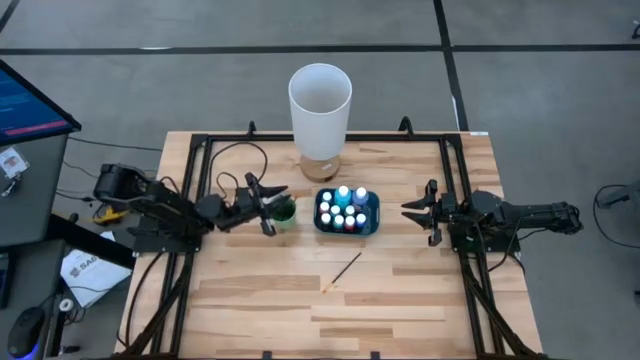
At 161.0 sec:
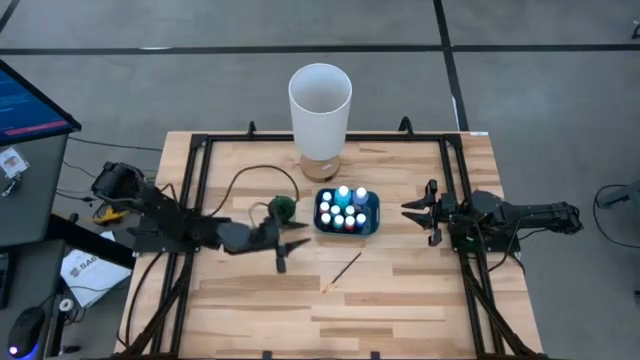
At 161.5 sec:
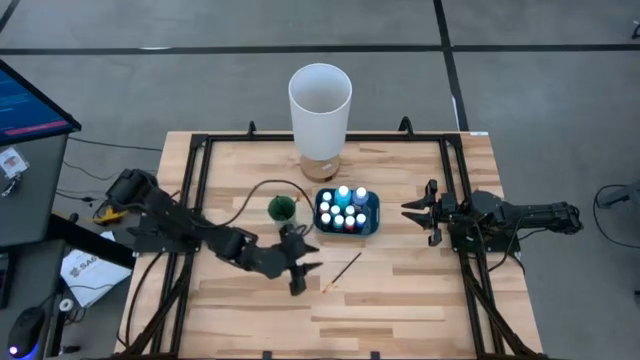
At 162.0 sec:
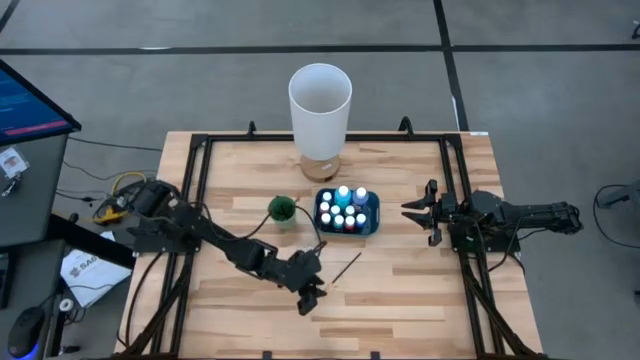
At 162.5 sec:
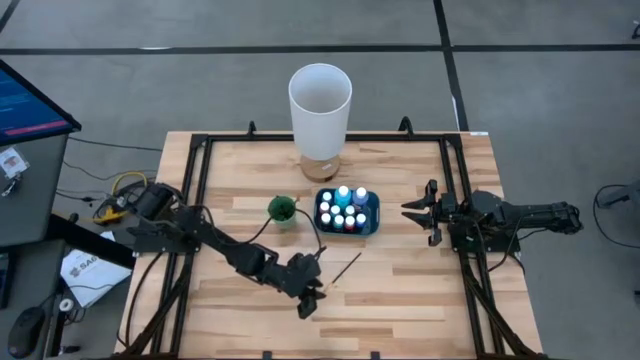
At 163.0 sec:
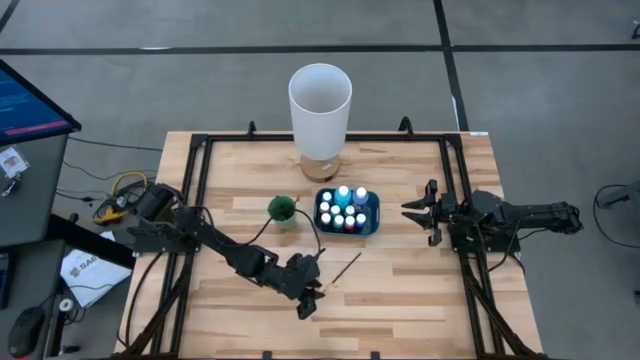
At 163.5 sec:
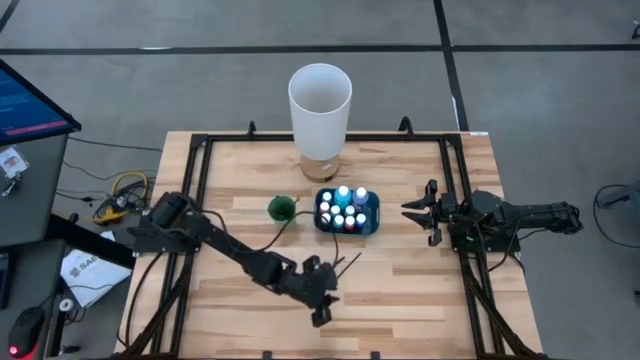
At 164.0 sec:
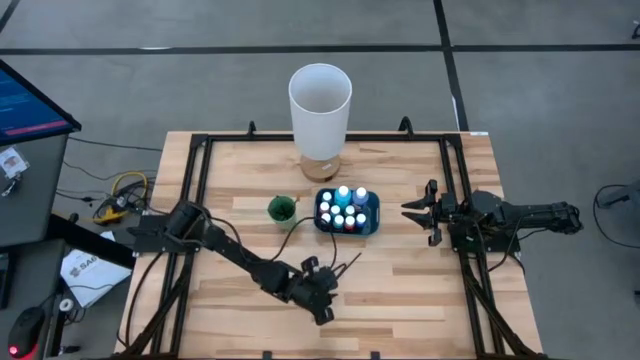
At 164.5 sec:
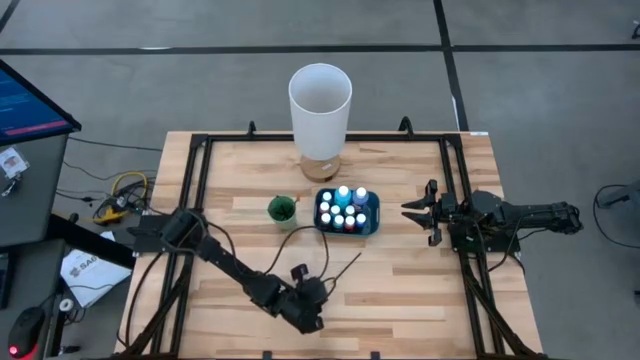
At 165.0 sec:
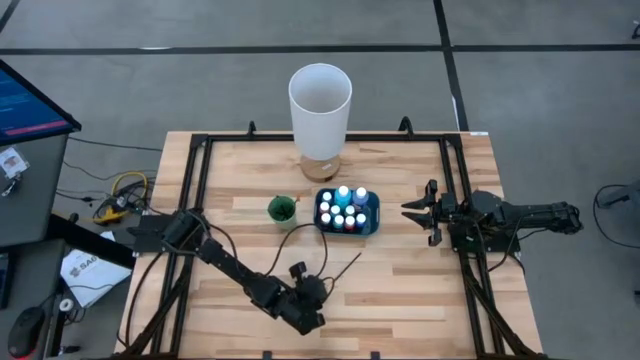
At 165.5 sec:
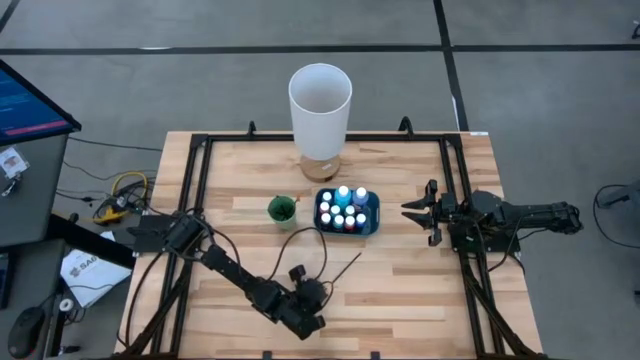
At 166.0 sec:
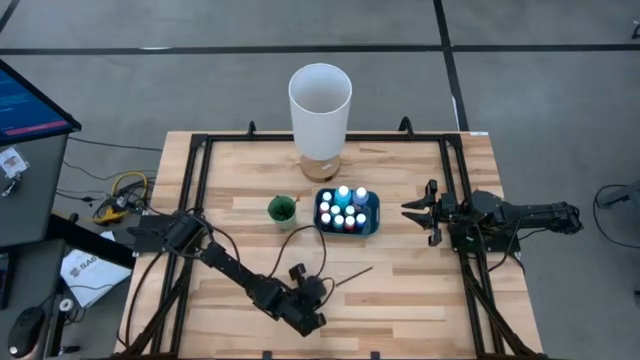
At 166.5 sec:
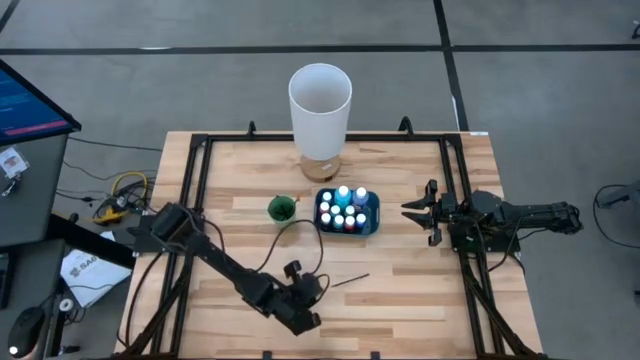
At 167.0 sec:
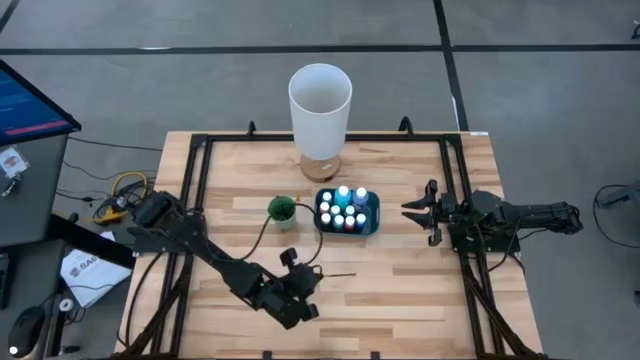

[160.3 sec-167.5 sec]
Task: Pick & Place Paint Supplies
Put the gold paintbrush into the green cup

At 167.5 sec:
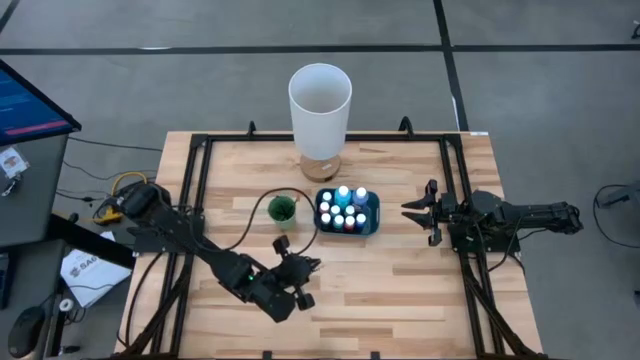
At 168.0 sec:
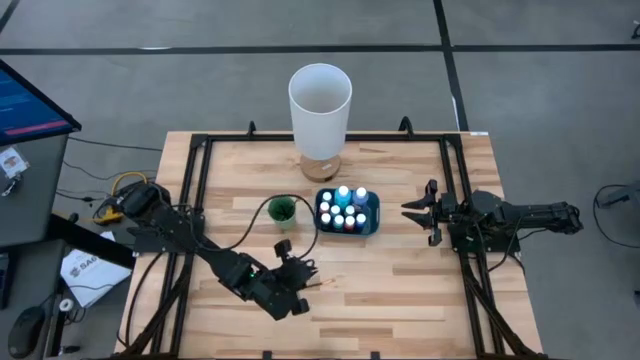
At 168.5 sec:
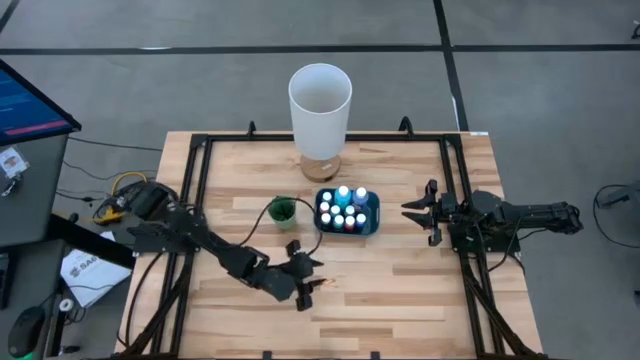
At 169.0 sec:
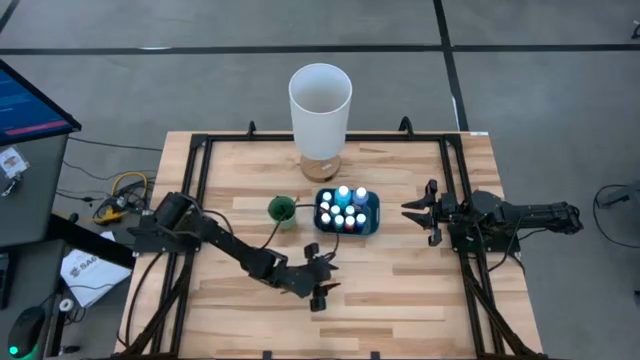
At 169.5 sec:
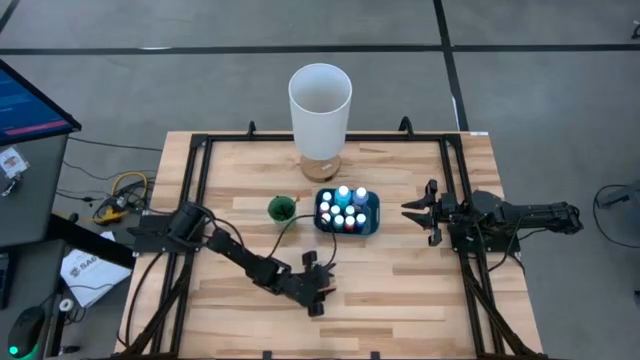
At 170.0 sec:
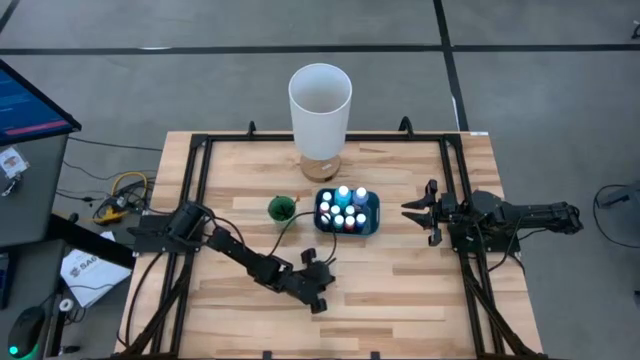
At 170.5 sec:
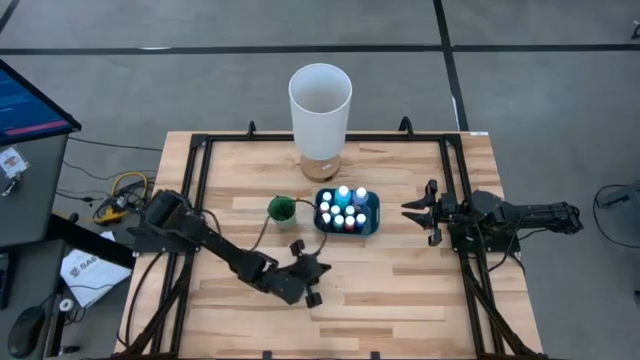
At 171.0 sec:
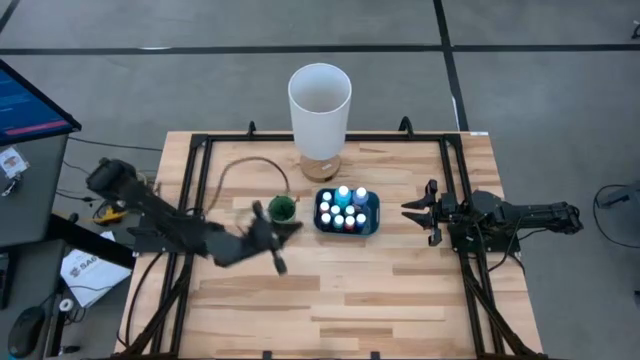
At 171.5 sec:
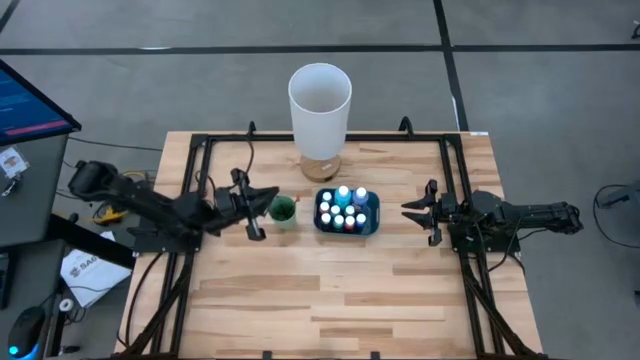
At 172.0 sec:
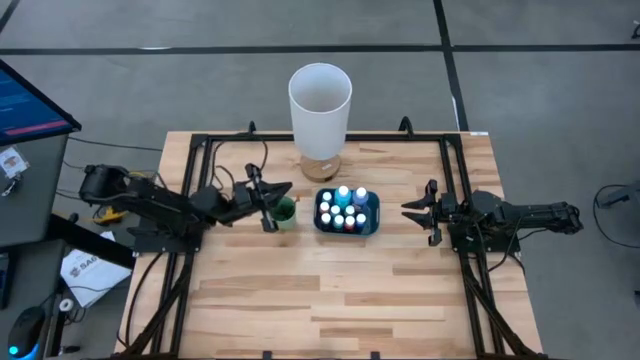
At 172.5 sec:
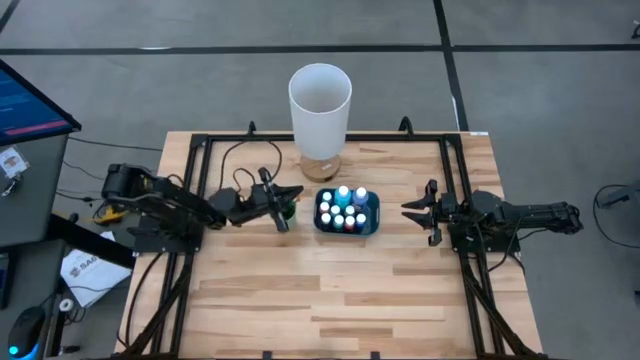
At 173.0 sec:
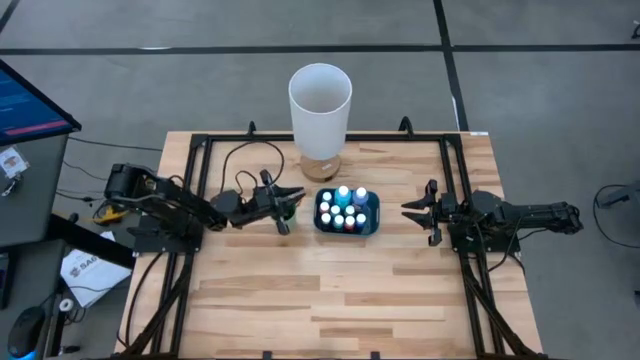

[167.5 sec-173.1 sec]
Put the gold paintbrush into the green cup

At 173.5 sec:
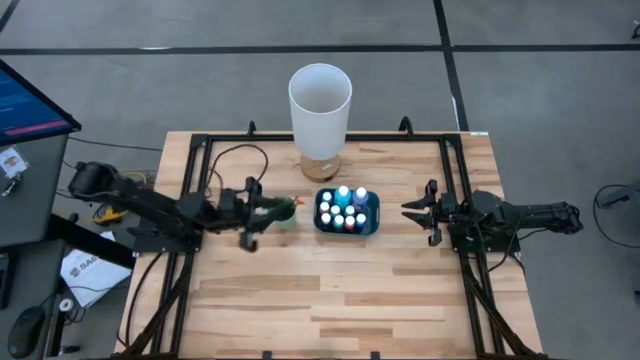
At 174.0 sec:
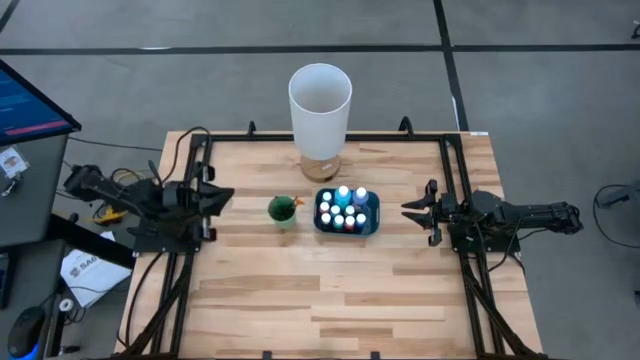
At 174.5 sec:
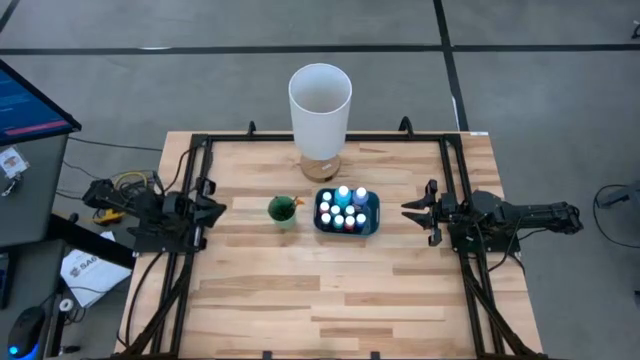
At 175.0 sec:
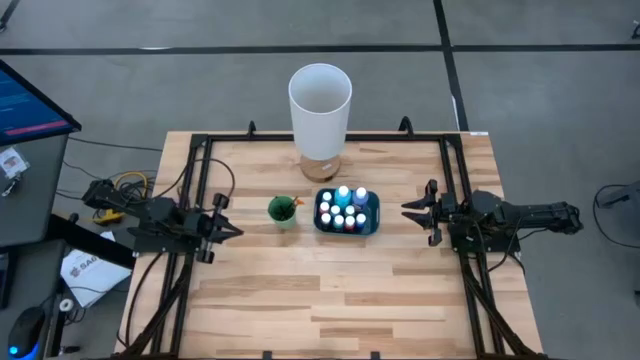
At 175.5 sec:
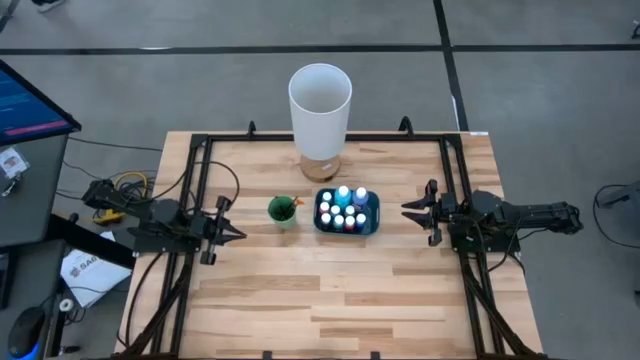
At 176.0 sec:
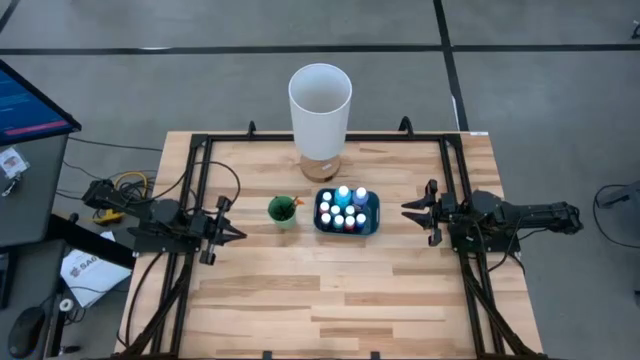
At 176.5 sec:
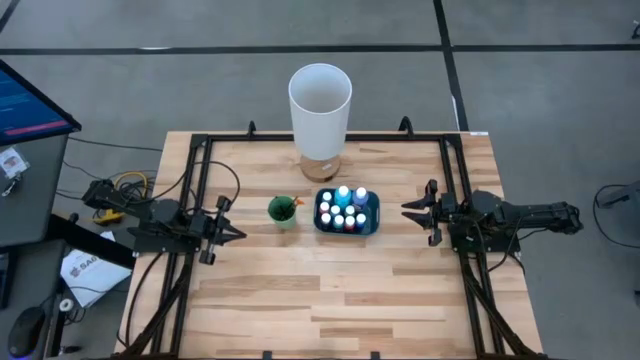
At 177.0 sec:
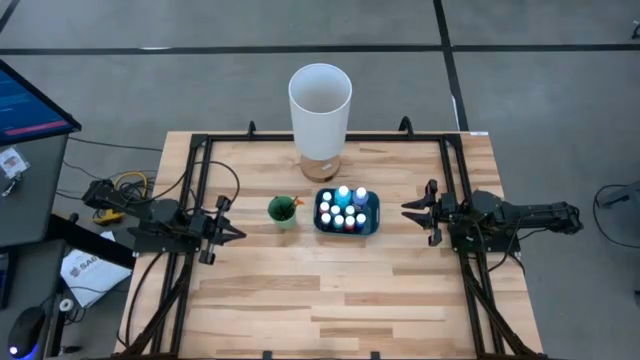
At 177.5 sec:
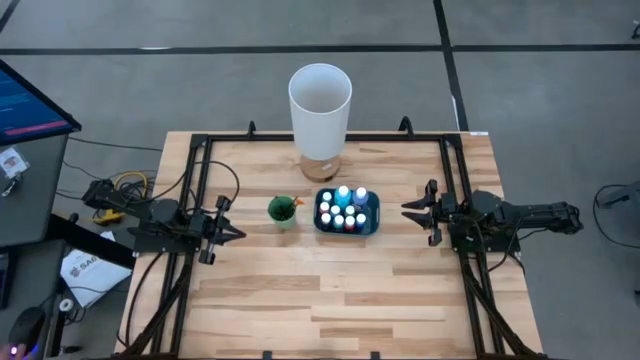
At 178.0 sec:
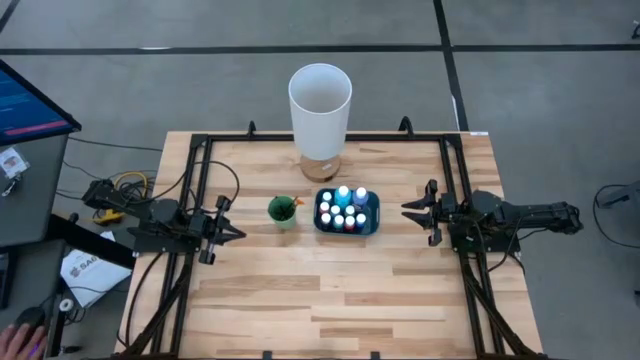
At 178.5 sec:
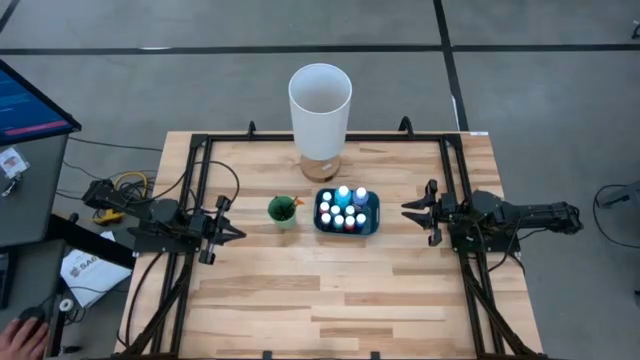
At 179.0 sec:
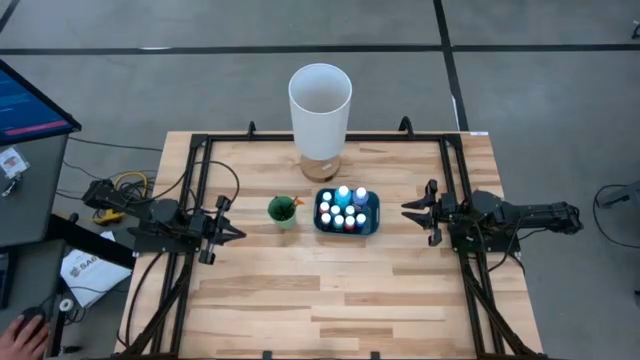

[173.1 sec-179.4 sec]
Return to Home Position

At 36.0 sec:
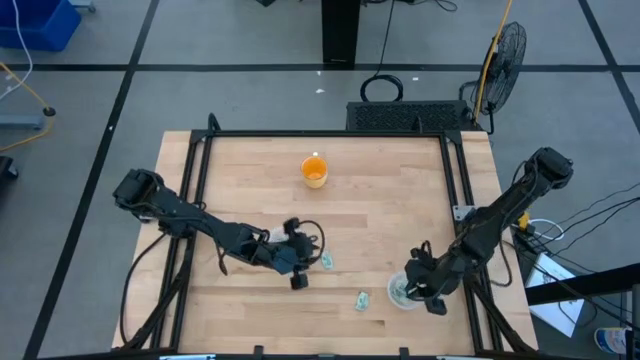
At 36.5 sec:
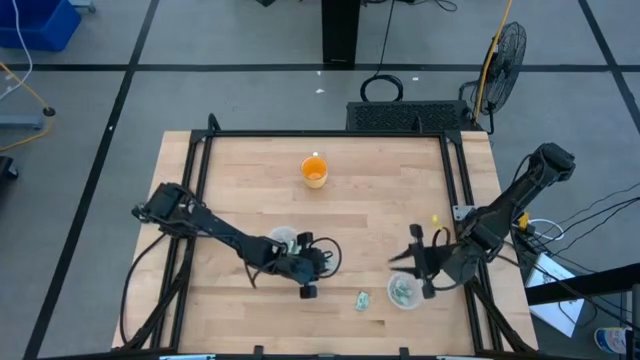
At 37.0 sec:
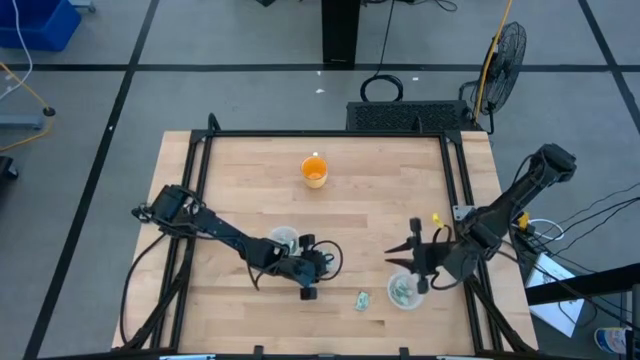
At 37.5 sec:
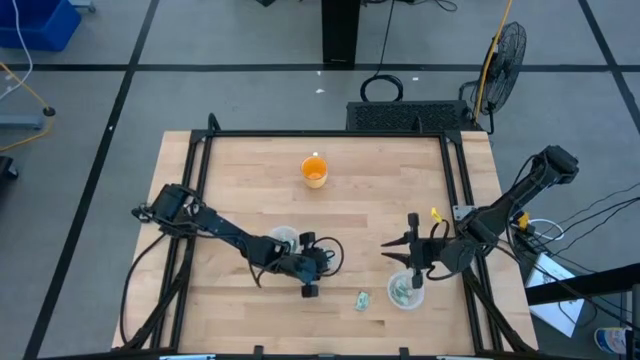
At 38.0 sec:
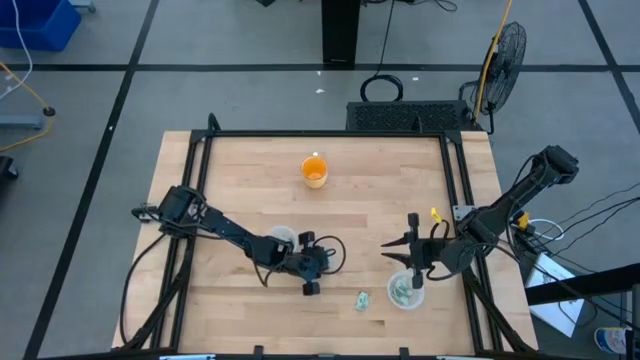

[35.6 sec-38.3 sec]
Task: Pick and place Stevia / Truvia into bins
Put the white stevia packet into the top transparent container
